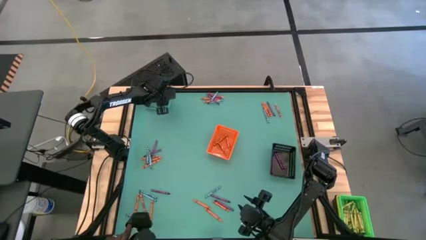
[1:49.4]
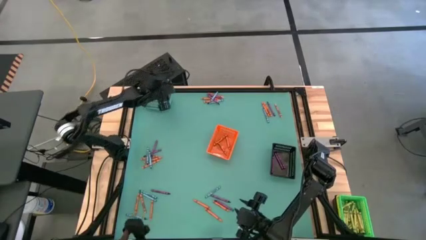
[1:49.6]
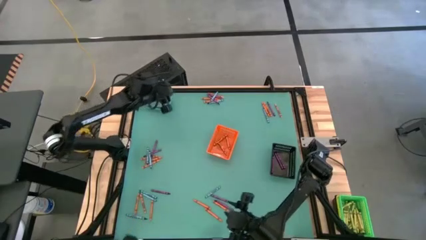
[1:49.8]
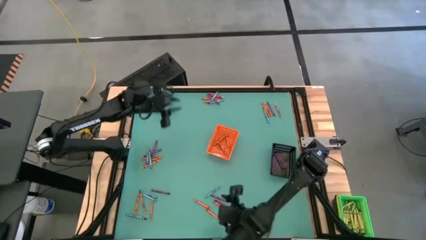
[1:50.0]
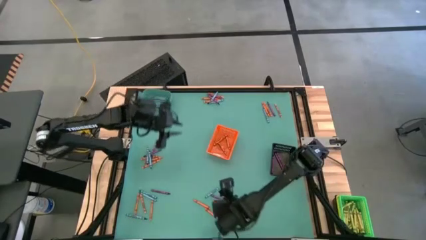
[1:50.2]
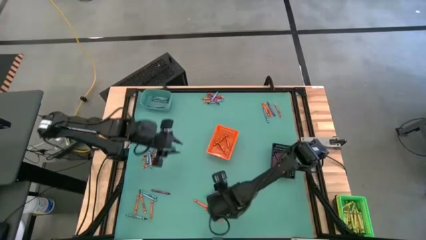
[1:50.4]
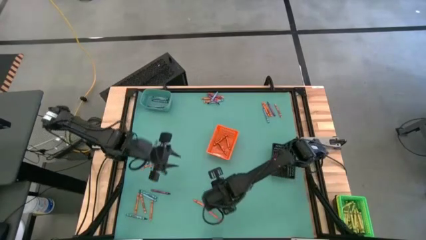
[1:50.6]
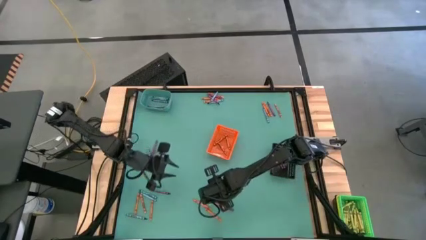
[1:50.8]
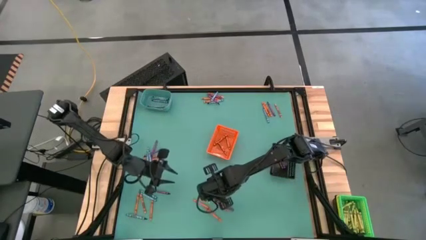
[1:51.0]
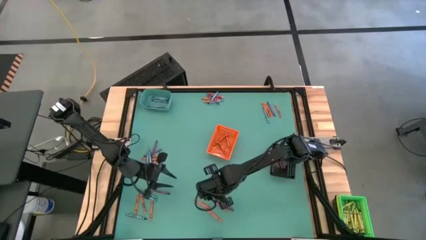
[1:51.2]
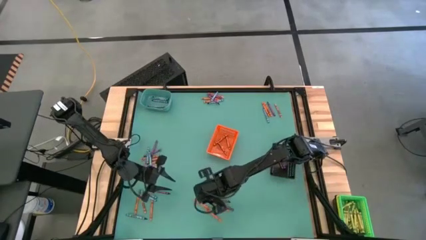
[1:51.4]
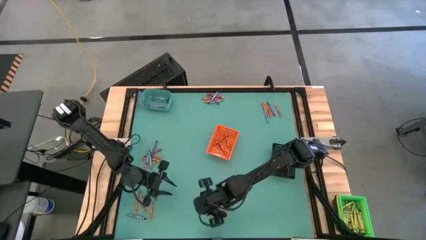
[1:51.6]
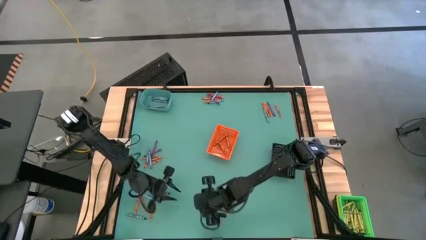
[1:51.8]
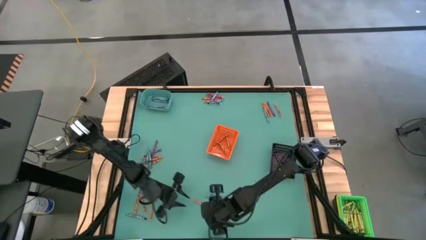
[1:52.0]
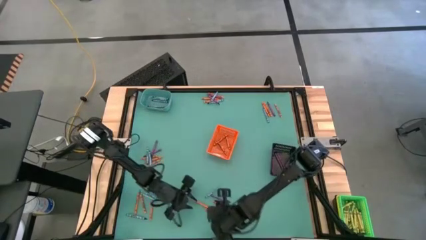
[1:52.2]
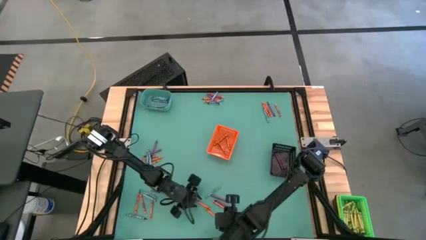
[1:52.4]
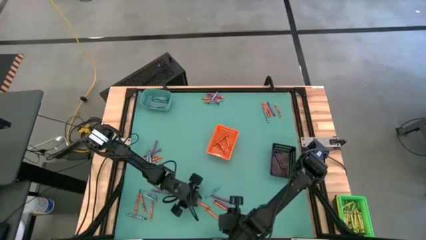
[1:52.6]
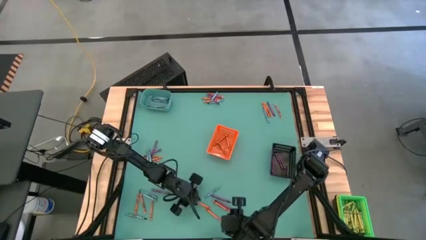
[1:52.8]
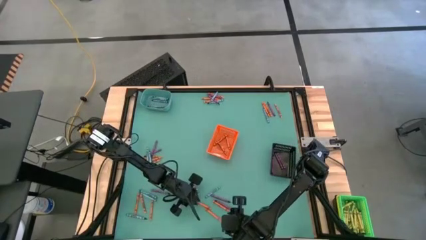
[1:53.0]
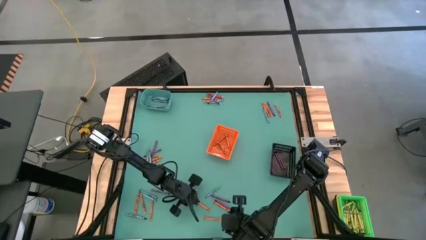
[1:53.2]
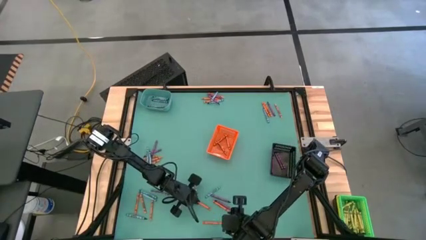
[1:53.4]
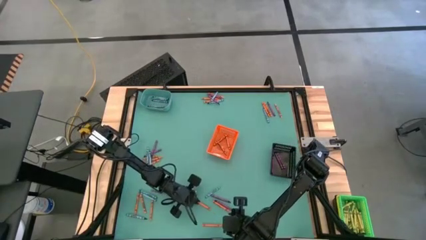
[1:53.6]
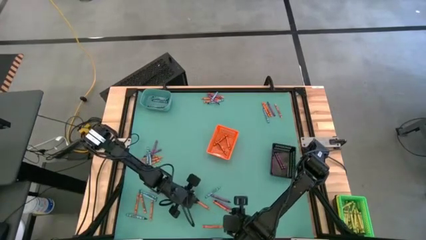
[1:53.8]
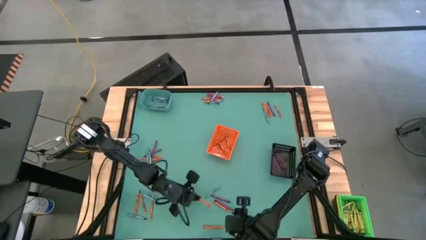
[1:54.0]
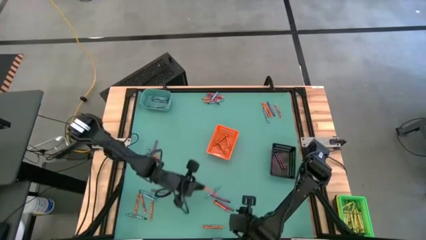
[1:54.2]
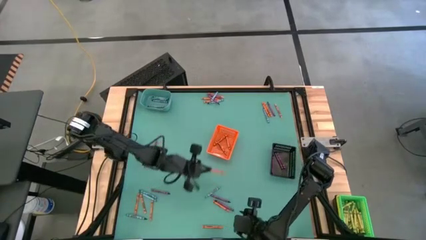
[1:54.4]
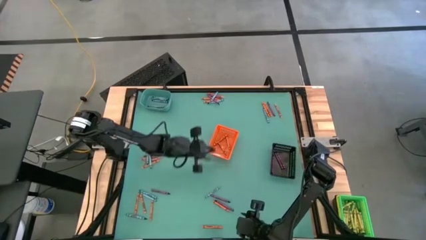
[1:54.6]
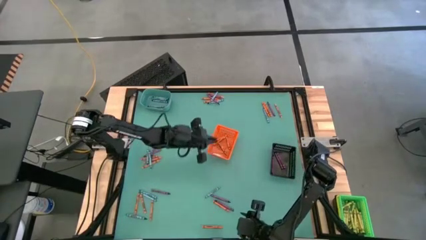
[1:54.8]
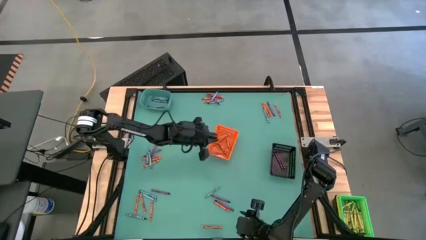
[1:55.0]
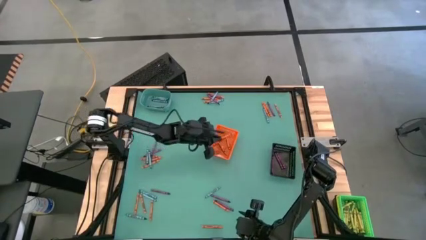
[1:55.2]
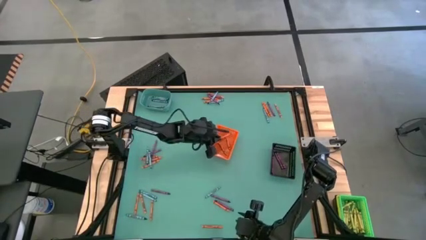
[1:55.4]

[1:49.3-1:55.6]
Task: Sort crayons
Put the orange crayon into the orange bin

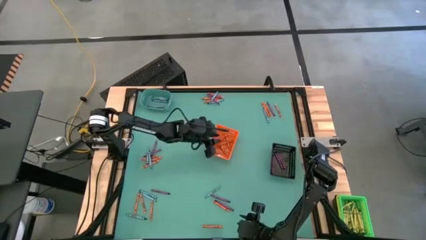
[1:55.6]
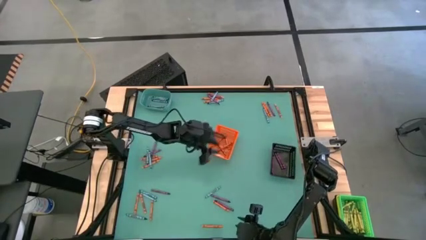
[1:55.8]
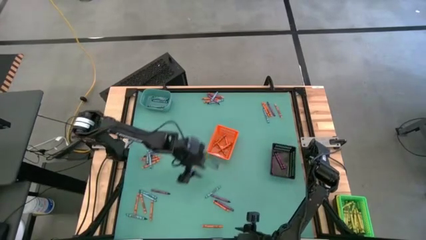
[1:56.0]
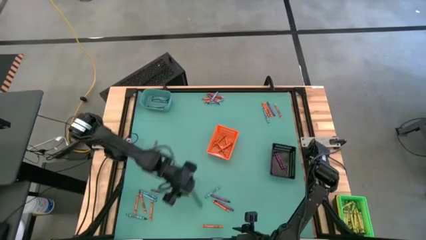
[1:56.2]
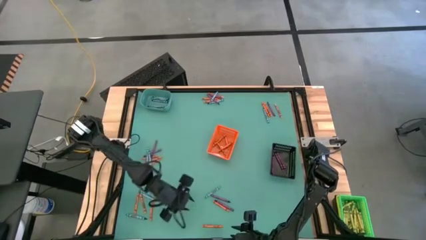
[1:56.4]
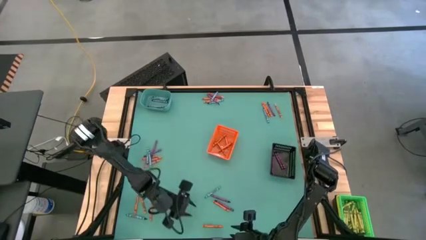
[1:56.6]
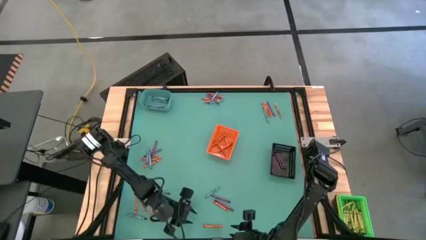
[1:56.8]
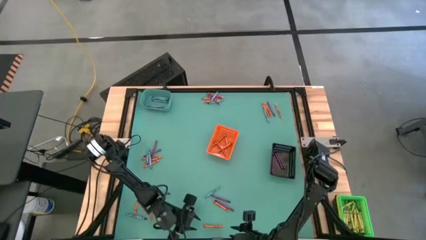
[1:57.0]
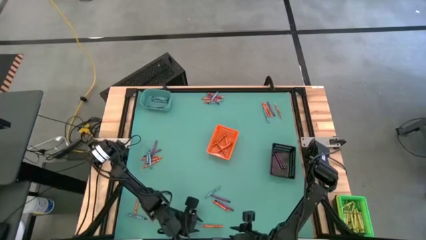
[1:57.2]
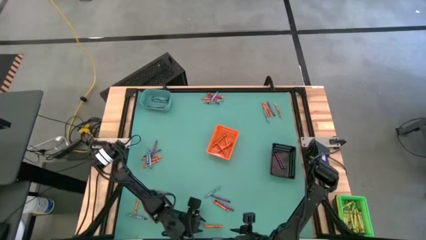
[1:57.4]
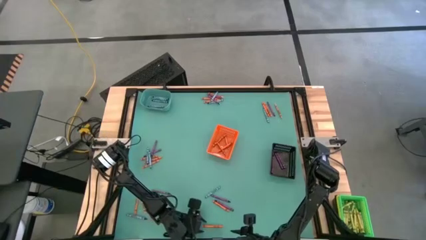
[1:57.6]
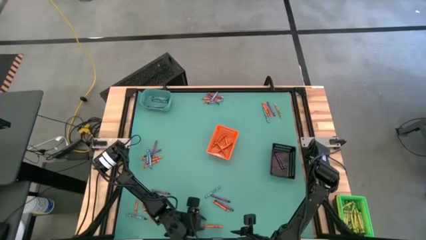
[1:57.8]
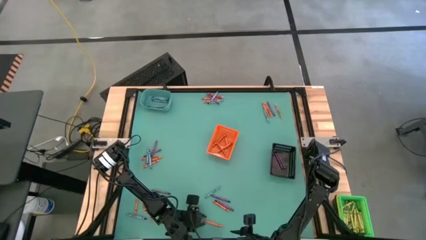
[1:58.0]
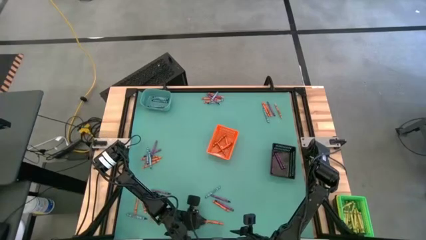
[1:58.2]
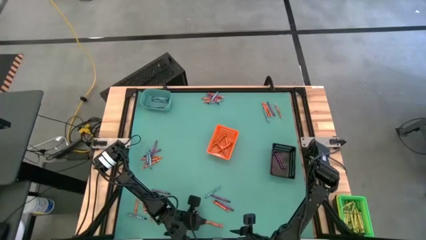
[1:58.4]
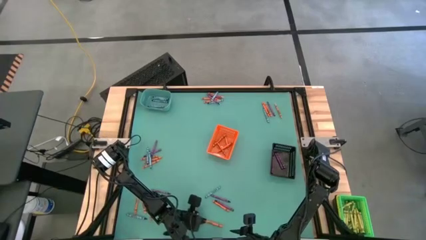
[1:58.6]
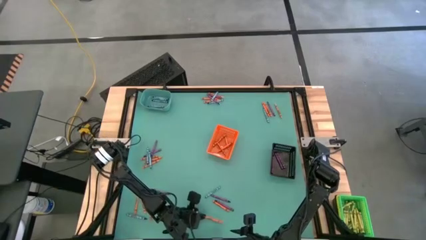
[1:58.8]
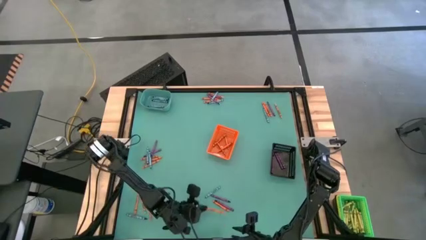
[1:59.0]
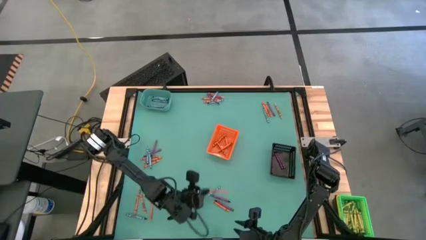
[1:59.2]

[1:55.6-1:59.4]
Put the orange crayon into the orange bin

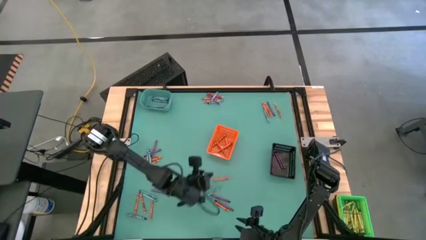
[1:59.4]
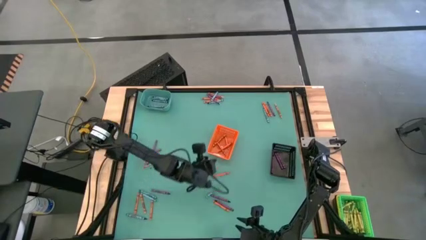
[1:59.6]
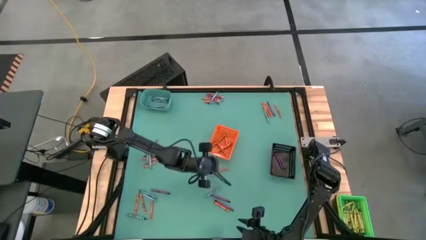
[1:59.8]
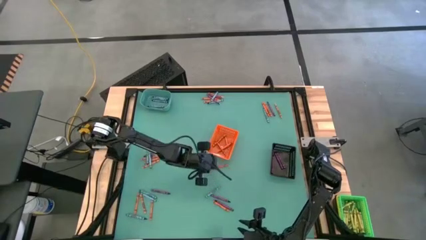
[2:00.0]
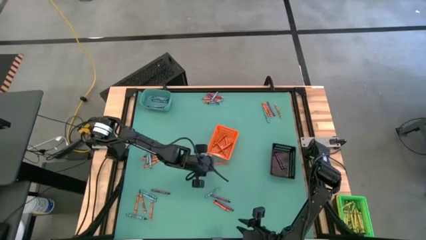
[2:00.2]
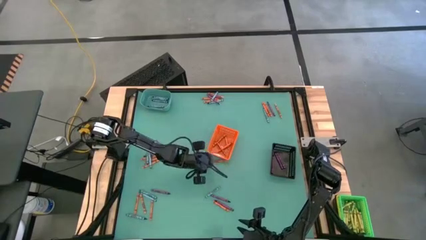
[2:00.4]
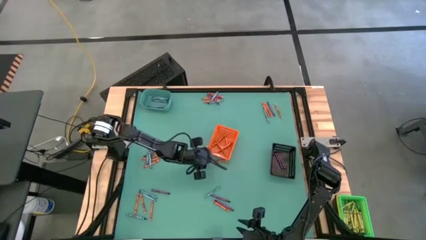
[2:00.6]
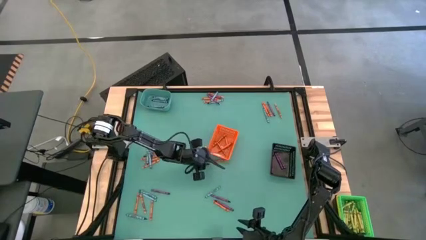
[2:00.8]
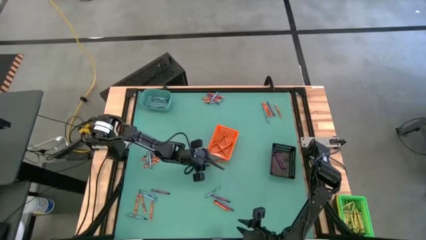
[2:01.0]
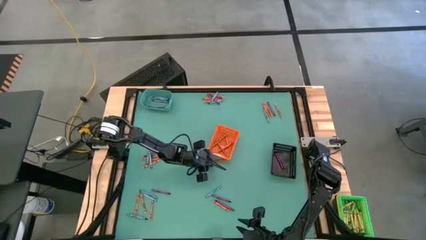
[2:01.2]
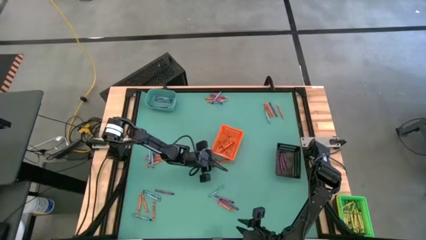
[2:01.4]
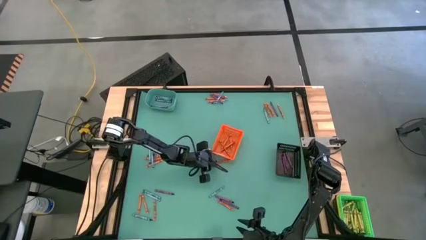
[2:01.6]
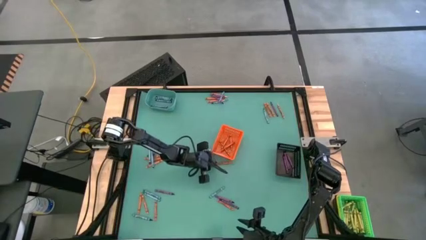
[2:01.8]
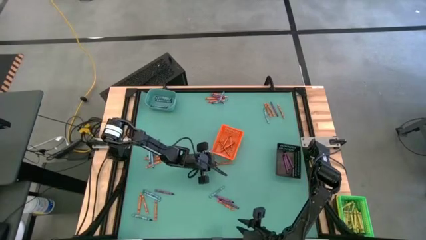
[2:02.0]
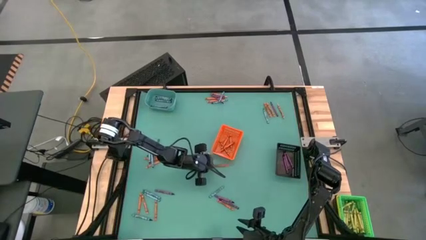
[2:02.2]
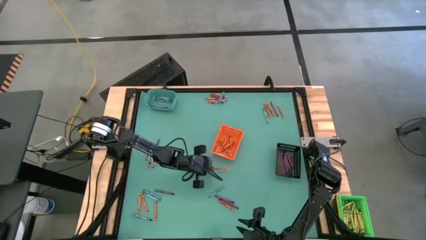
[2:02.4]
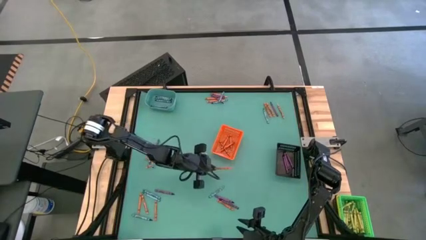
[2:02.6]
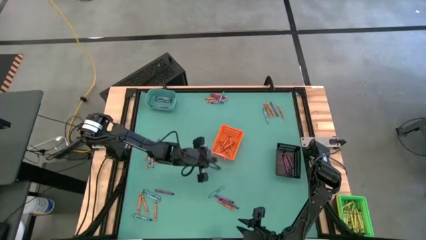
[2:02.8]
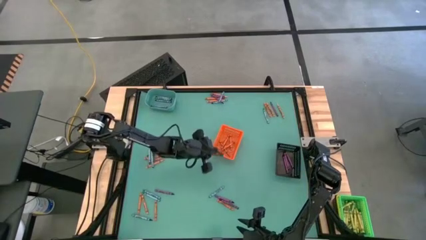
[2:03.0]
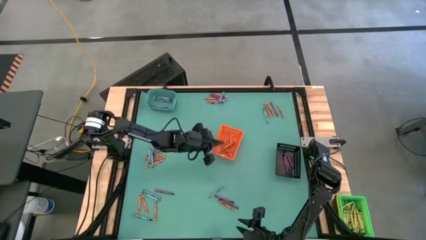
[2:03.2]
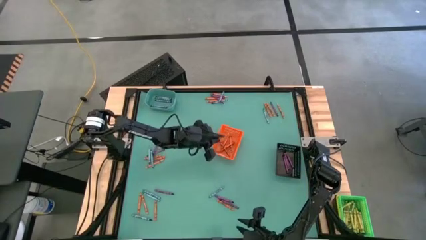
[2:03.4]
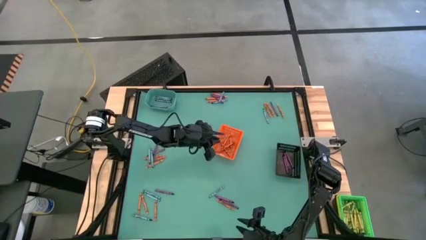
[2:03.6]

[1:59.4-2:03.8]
Put the orange crayon into the orange bin
